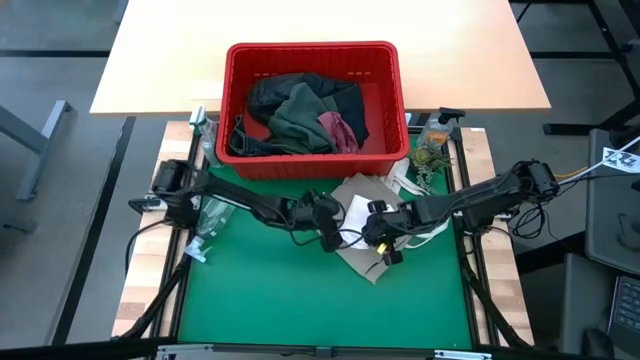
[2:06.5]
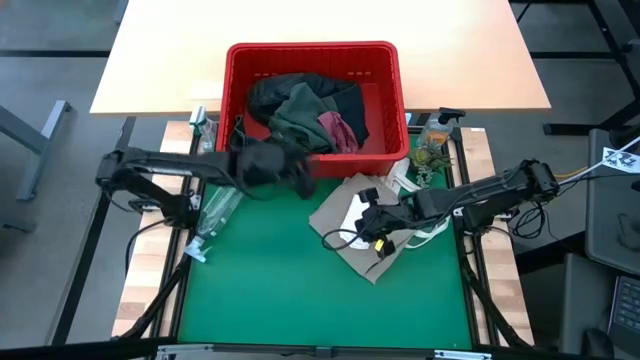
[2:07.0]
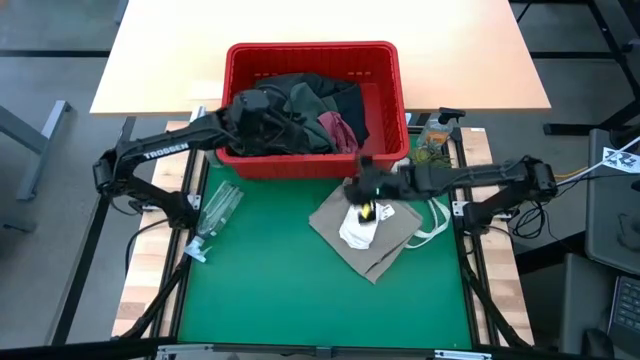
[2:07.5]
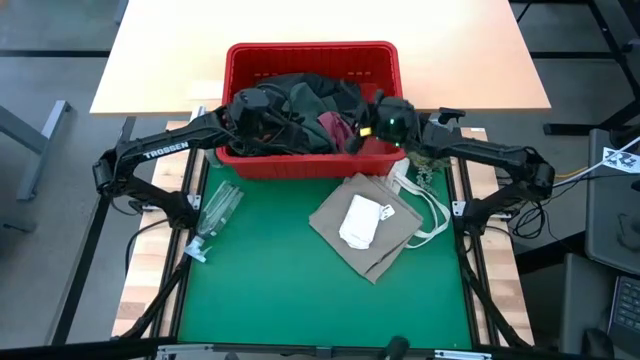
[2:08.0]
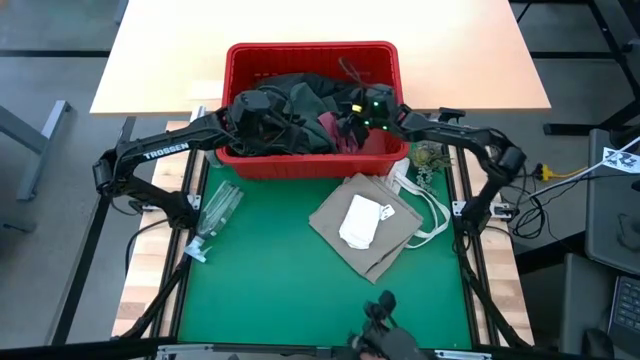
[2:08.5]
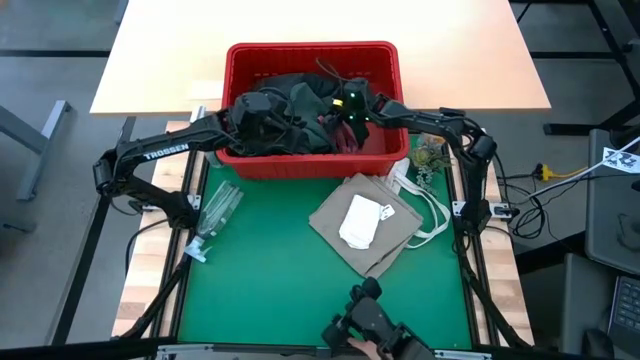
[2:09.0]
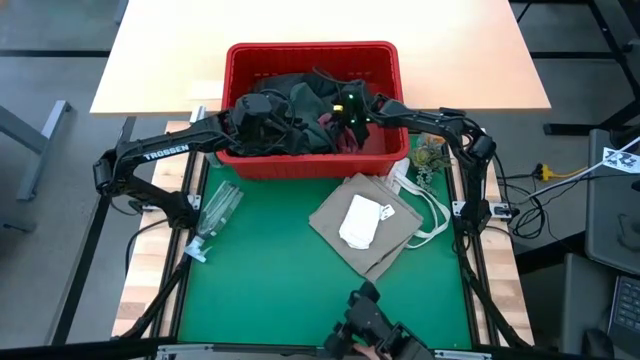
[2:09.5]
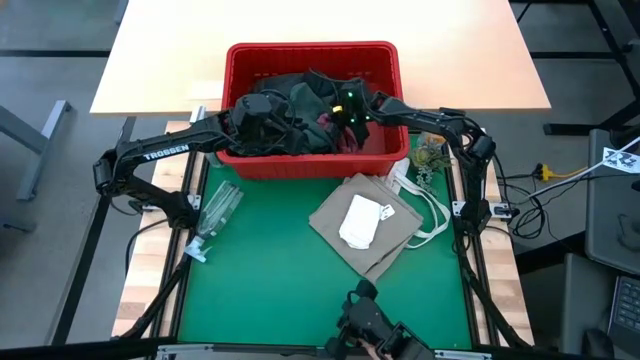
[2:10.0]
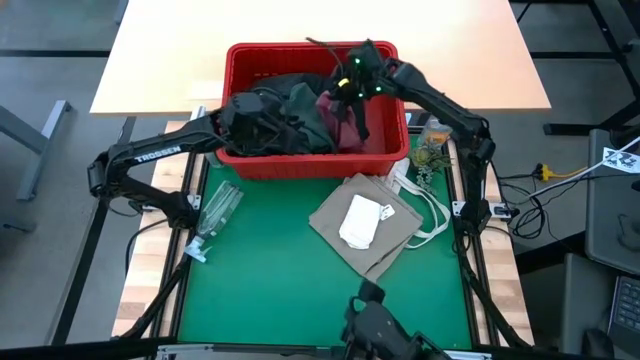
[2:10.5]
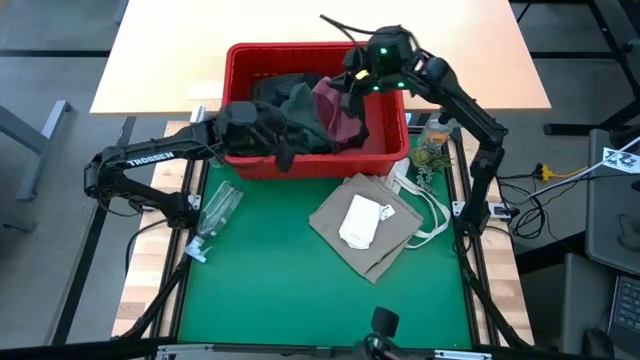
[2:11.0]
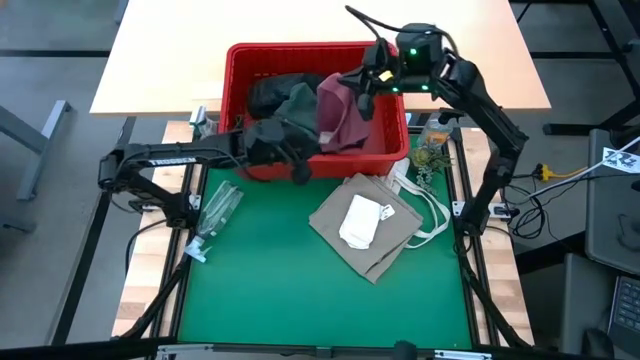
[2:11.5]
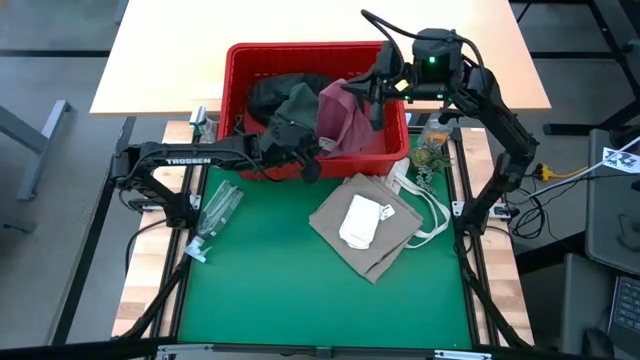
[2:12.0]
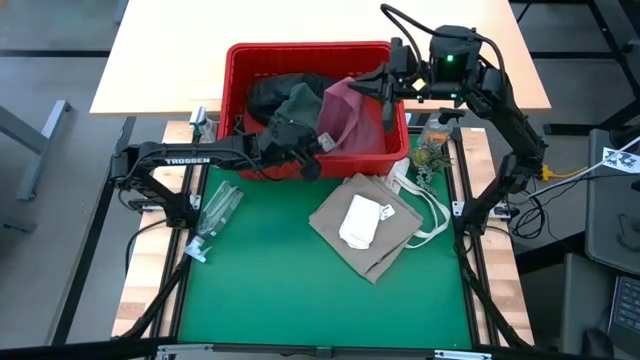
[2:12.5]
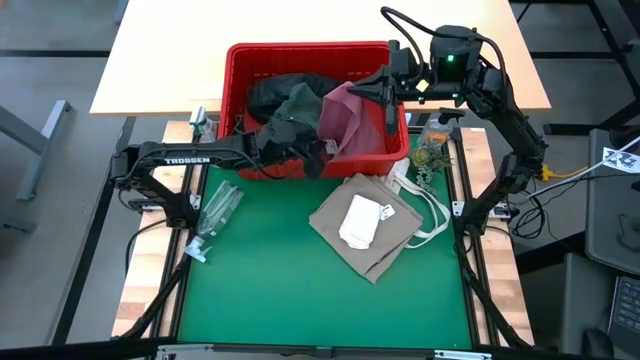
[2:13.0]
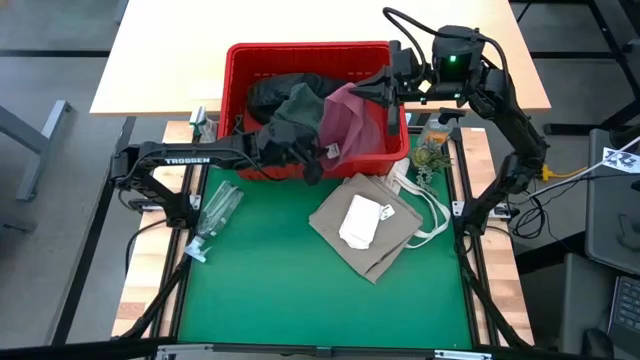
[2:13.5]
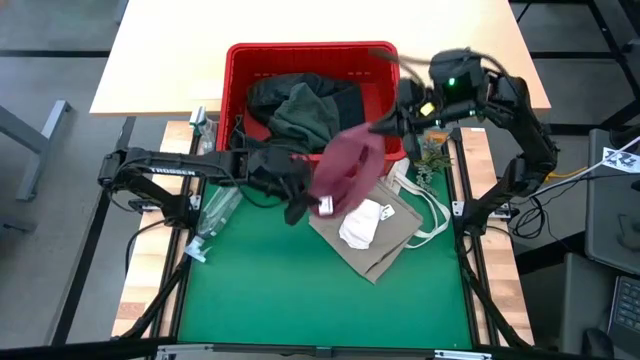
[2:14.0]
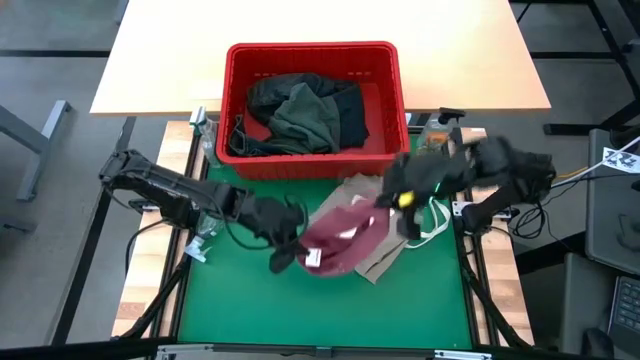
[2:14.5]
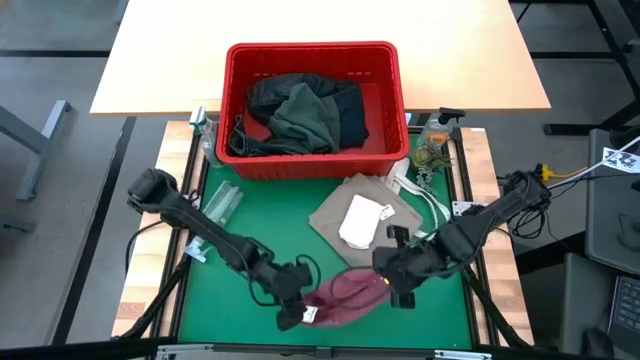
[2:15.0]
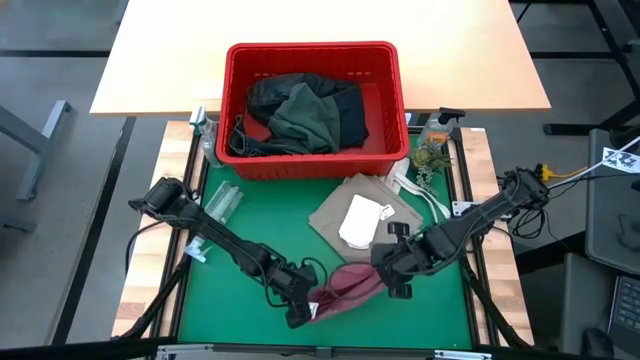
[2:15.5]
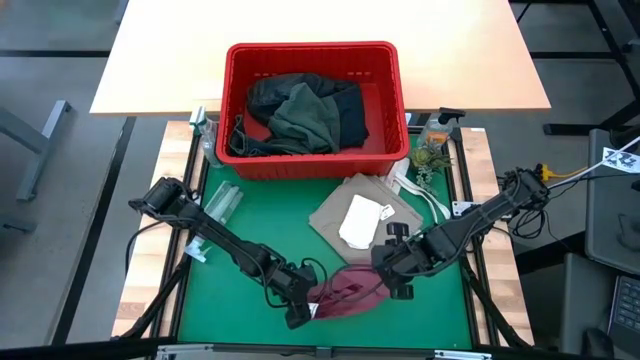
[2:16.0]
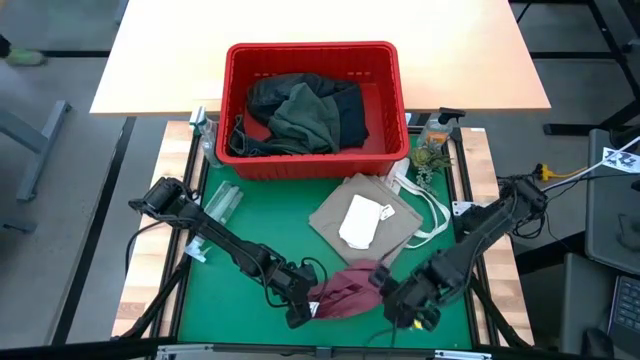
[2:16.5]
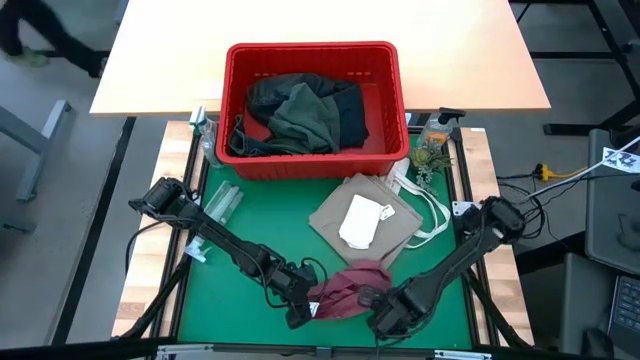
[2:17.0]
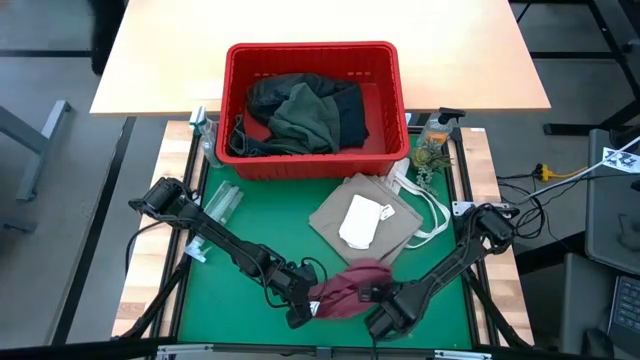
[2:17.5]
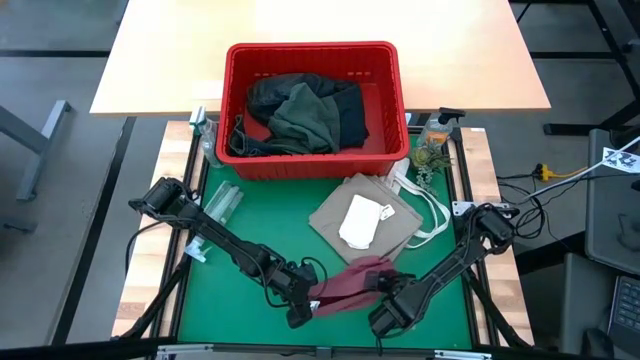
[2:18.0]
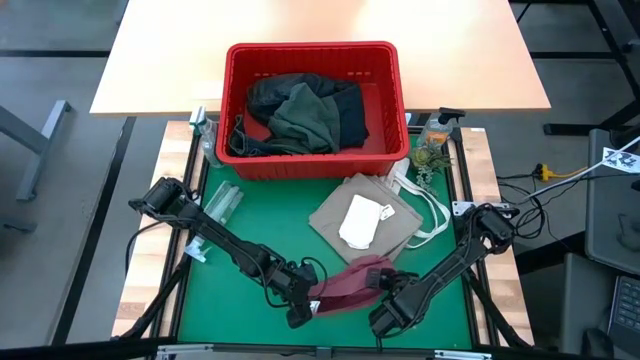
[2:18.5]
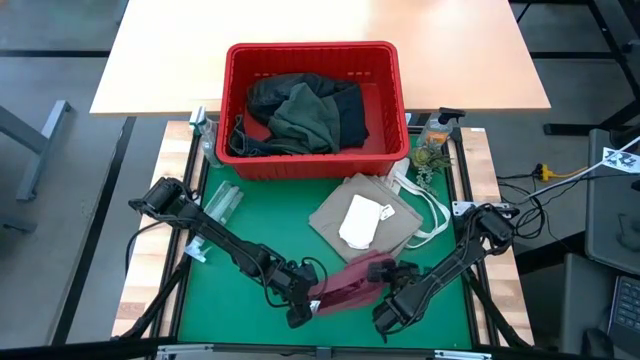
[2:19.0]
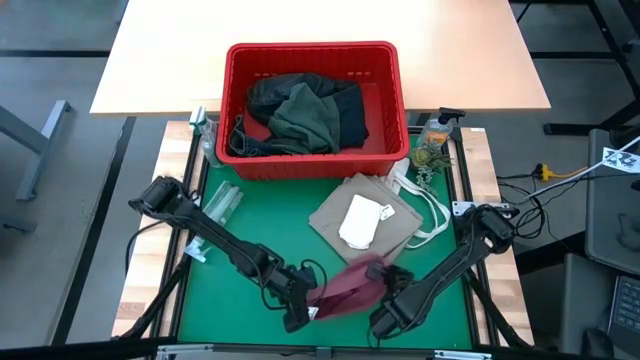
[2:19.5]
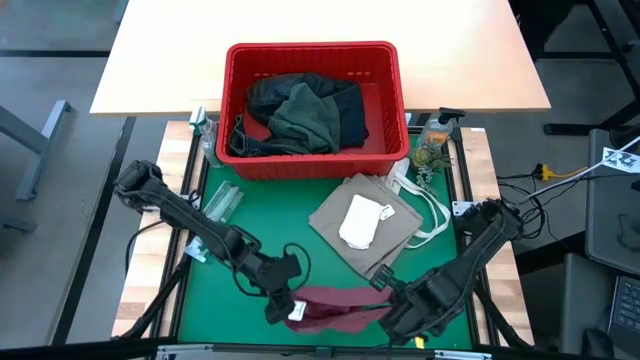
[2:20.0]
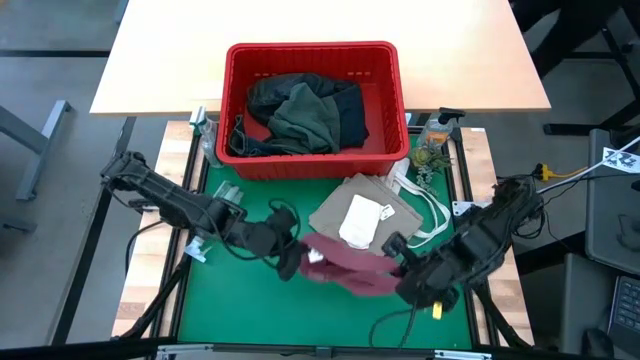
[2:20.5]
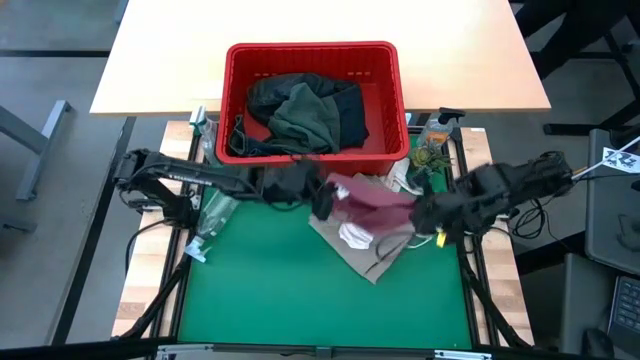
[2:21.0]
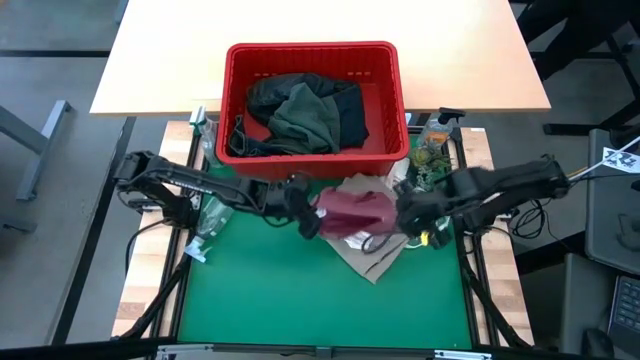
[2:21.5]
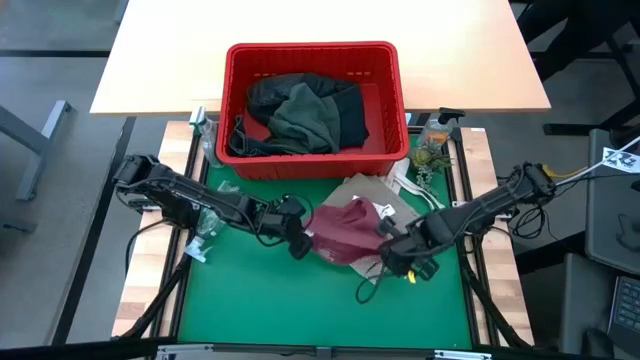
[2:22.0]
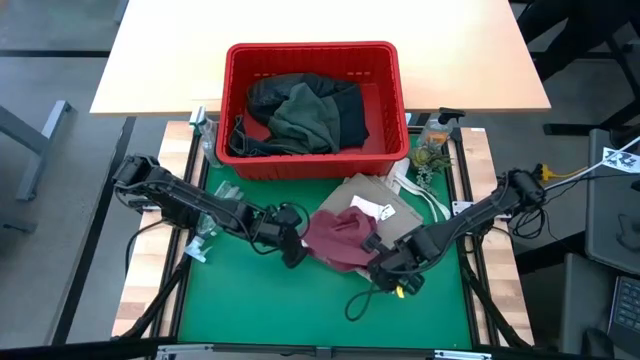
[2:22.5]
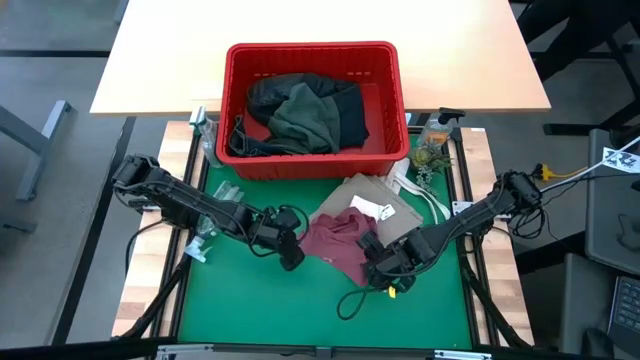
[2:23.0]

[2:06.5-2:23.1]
Task: Fold laundry
Fold the pink underwear

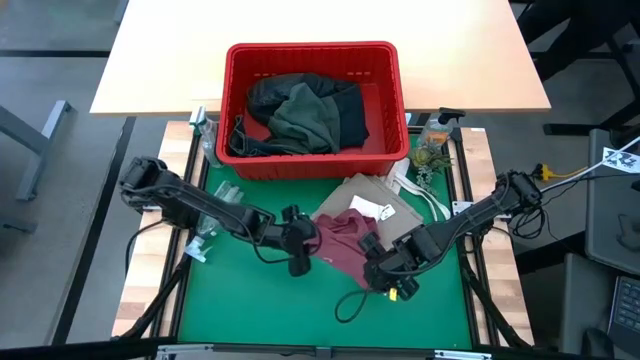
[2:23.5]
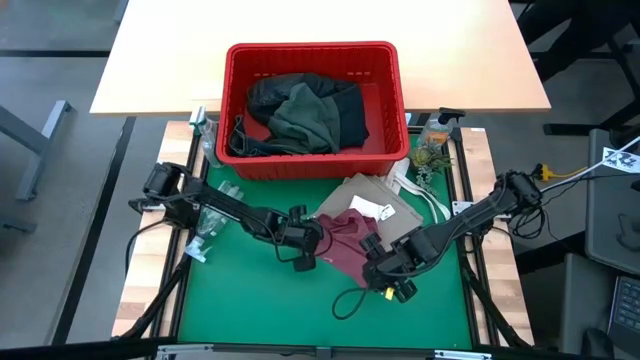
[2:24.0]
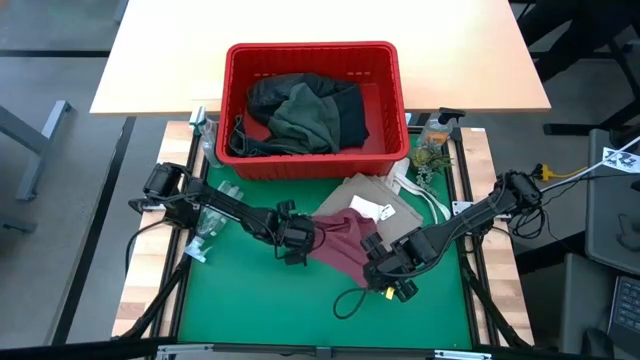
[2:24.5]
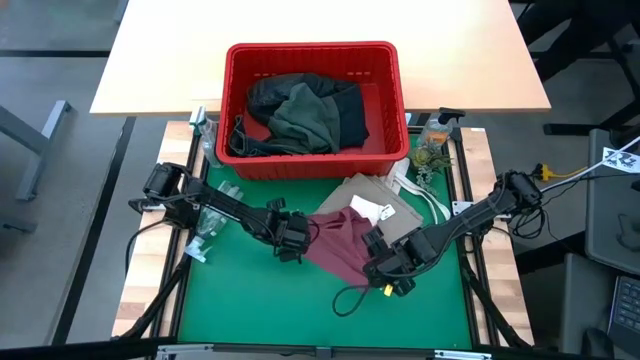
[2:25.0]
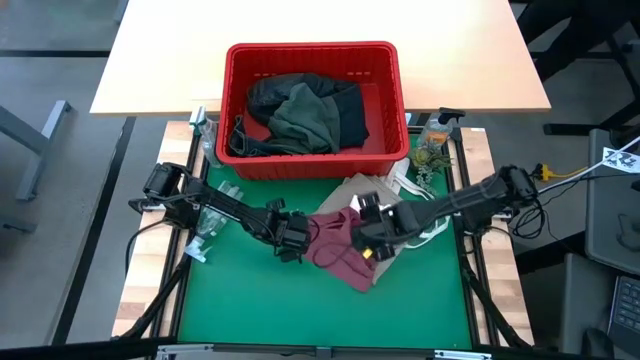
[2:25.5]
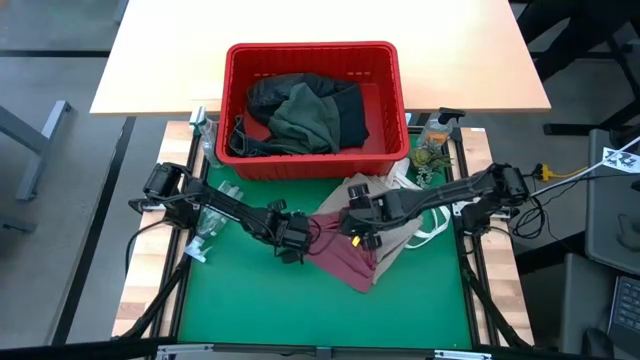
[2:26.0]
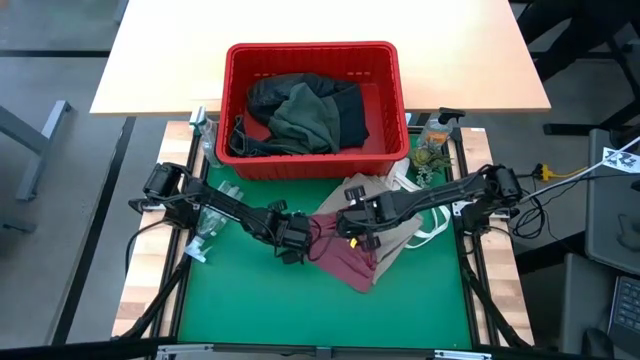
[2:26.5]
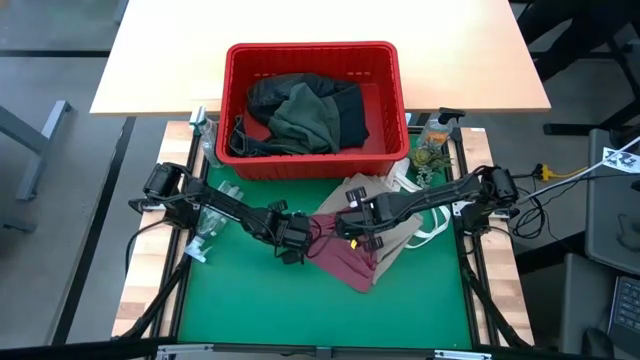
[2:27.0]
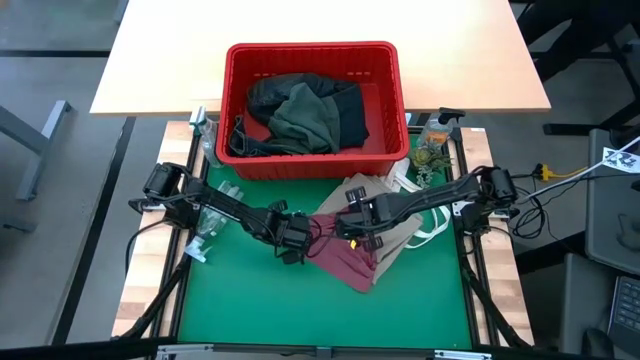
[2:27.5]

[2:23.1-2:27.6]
Fold the pink underwear
